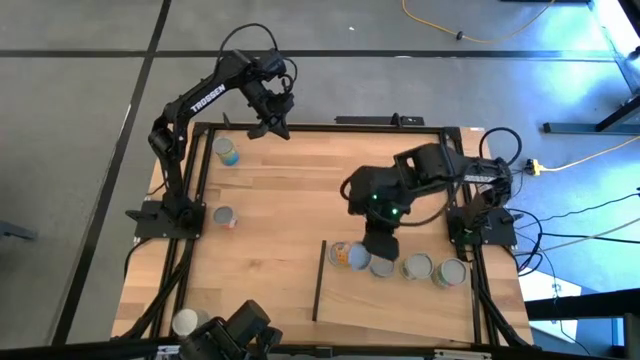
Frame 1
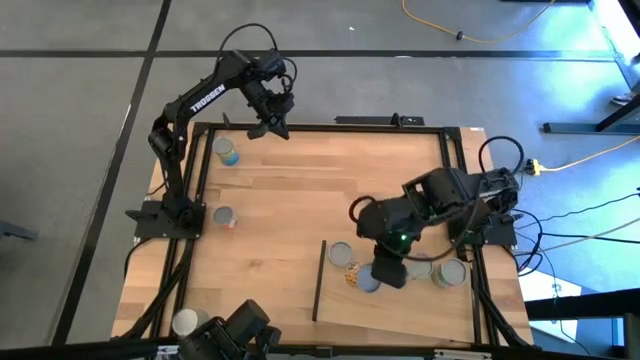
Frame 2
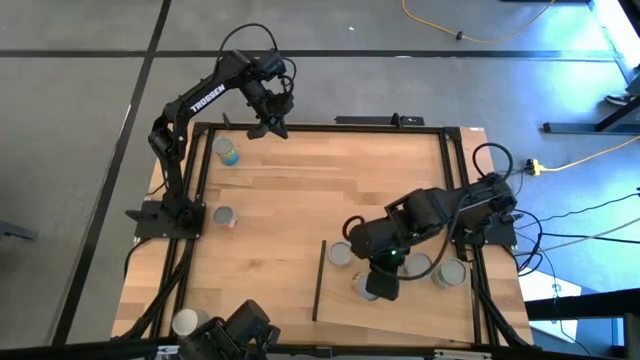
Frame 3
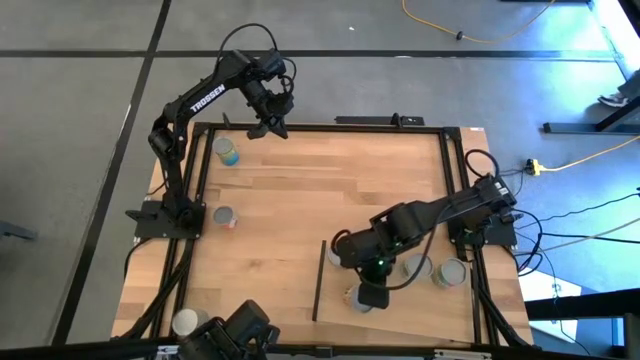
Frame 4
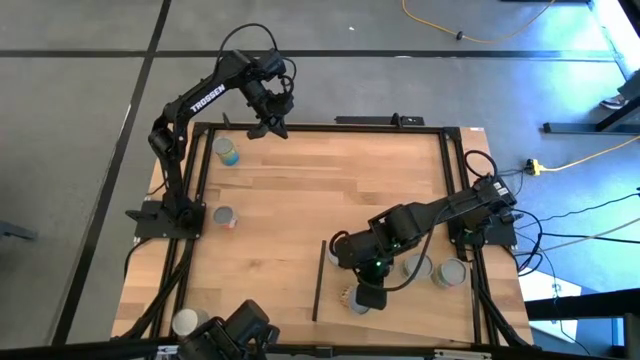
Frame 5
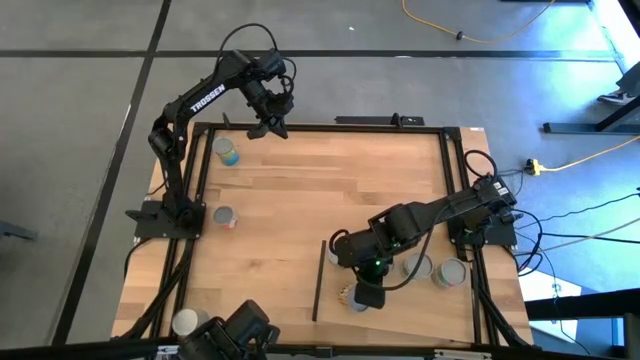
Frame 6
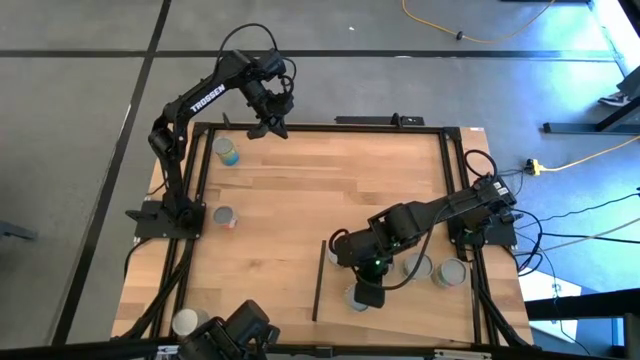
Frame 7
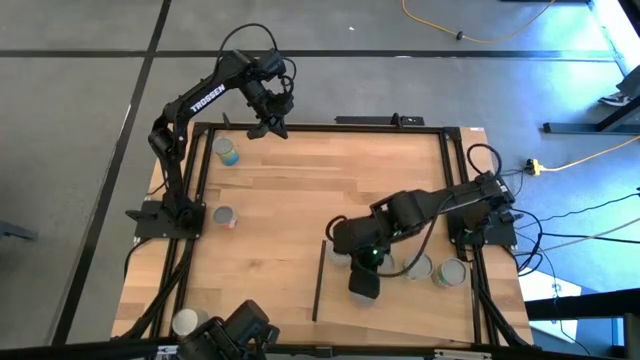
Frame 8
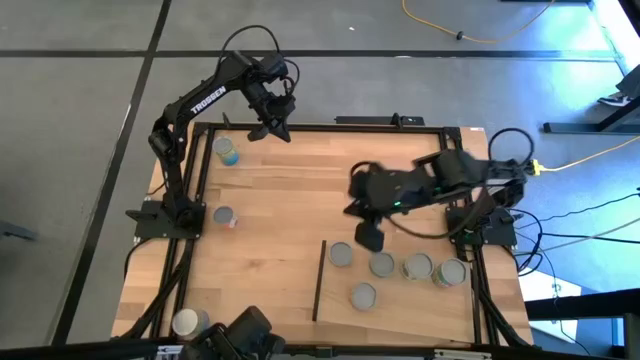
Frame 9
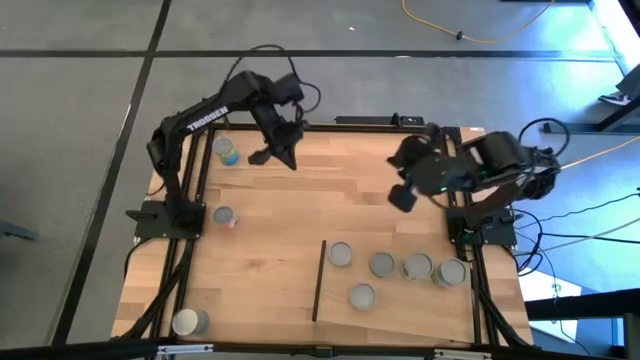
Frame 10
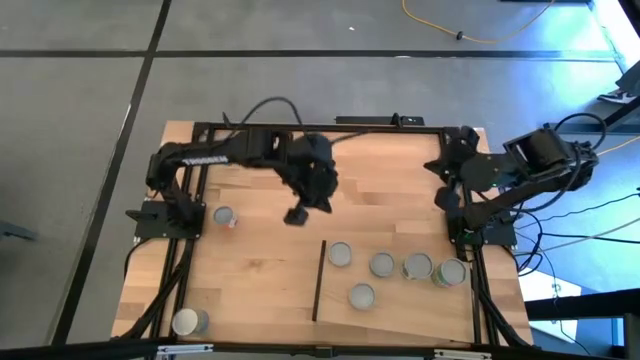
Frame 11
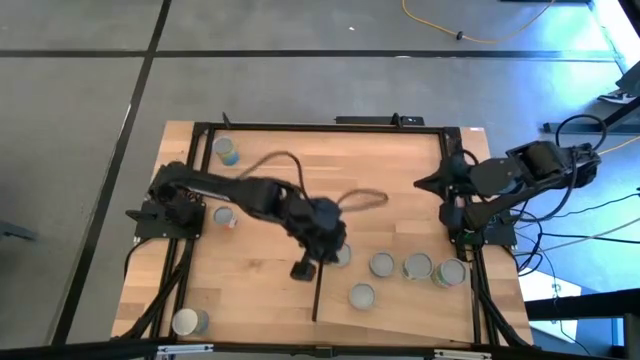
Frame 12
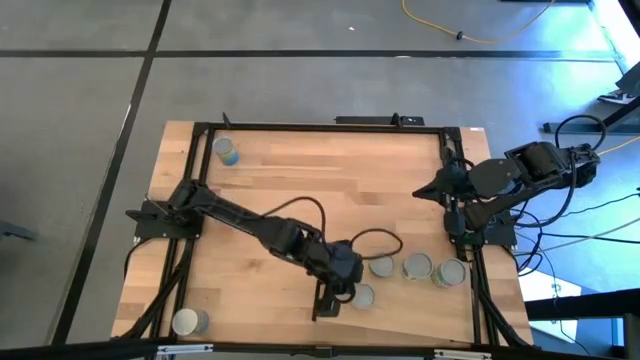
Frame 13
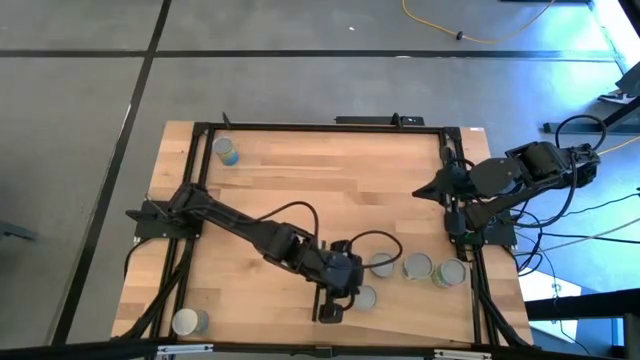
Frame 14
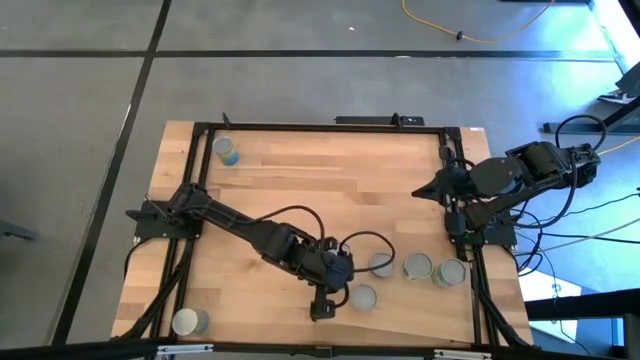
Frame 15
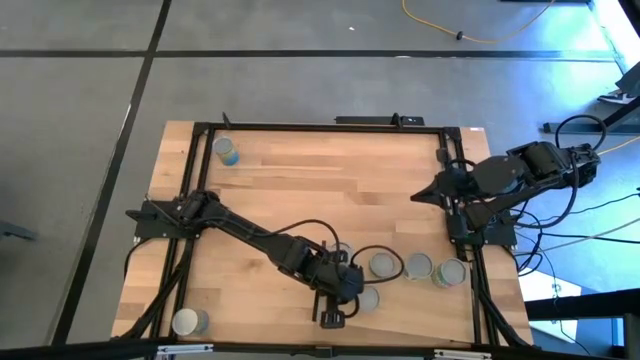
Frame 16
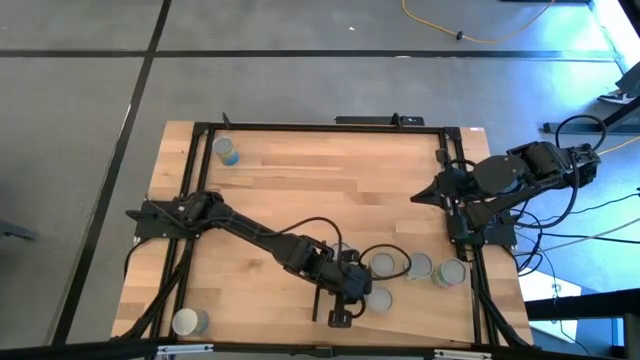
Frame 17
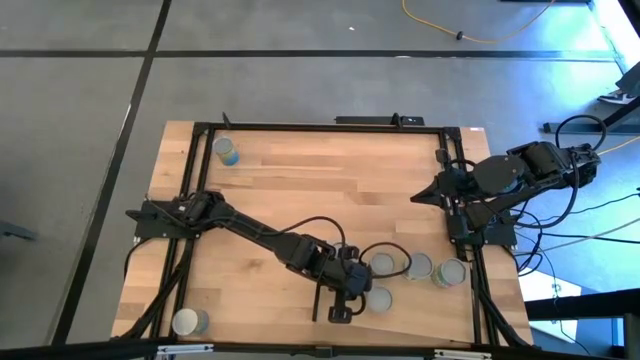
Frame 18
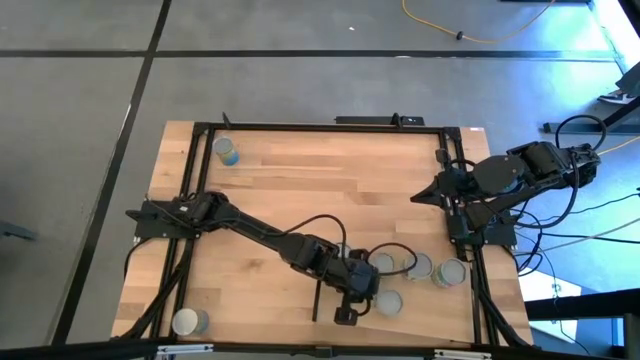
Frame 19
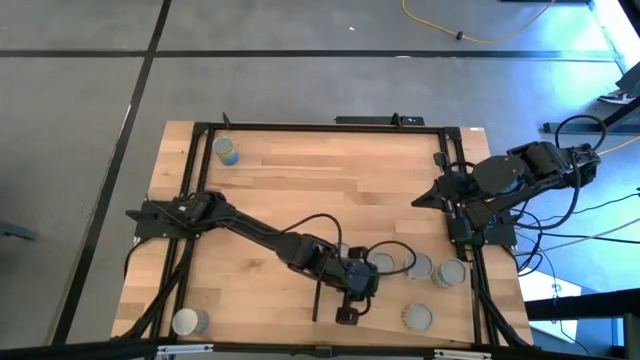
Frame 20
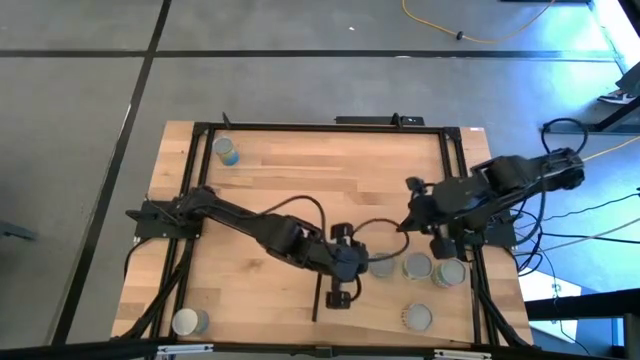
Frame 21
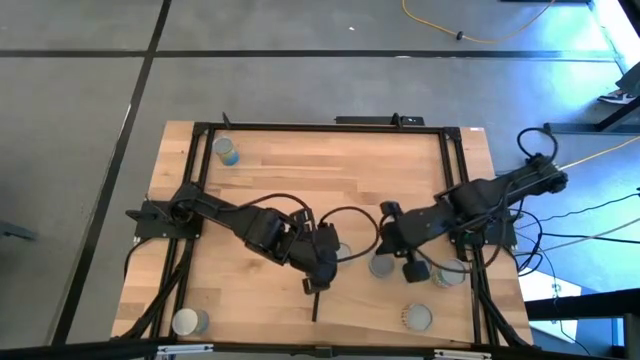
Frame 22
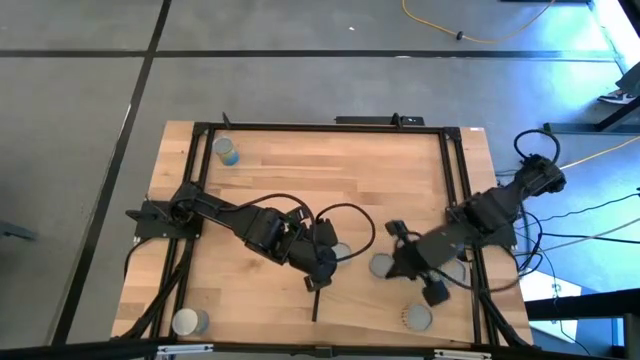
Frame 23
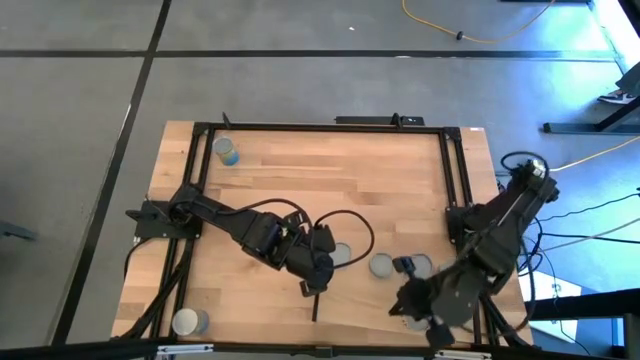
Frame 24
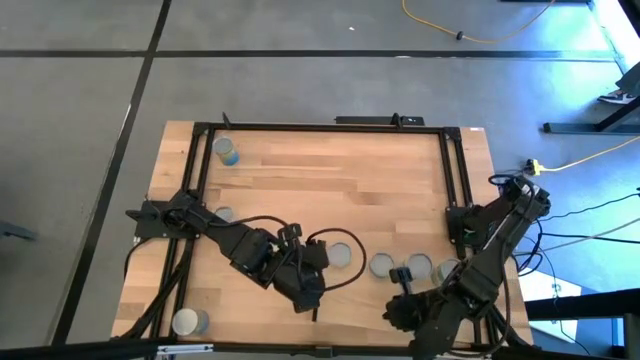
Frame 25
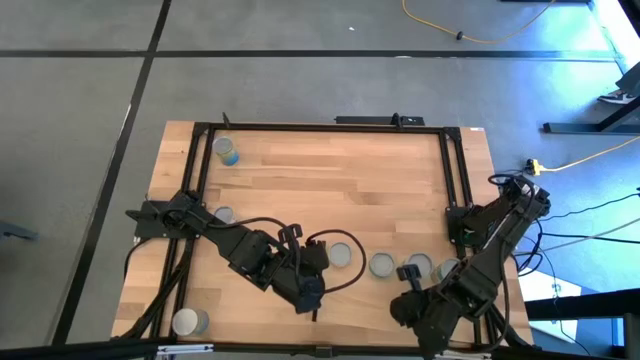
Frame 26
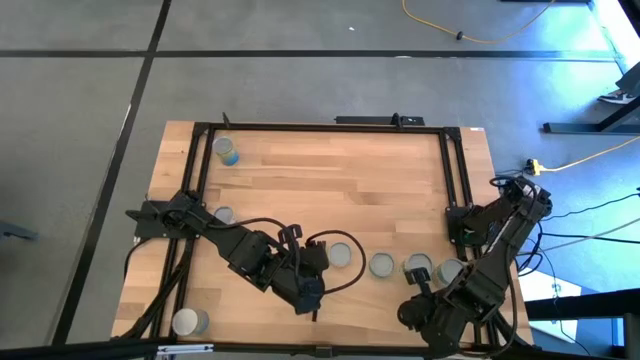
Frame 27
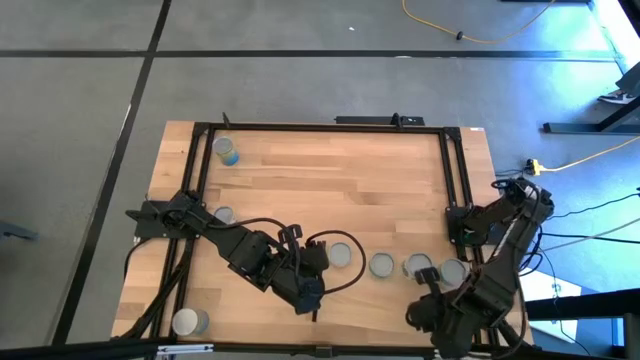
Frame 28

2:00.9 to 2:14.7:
Task: Pick and place cans onto a shelf
Put the yellow canned black beans on the shelf aligned with the other pink canned chicken soup

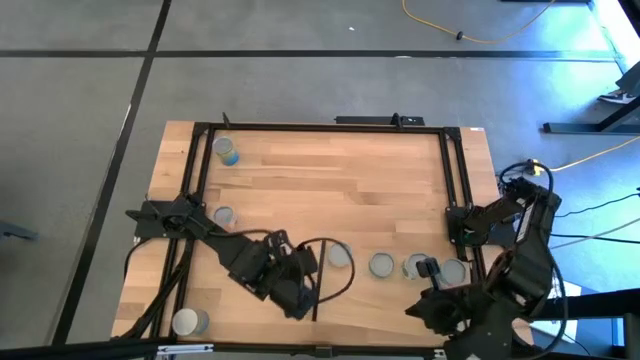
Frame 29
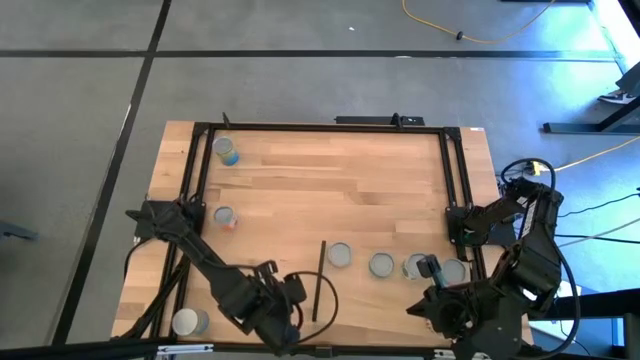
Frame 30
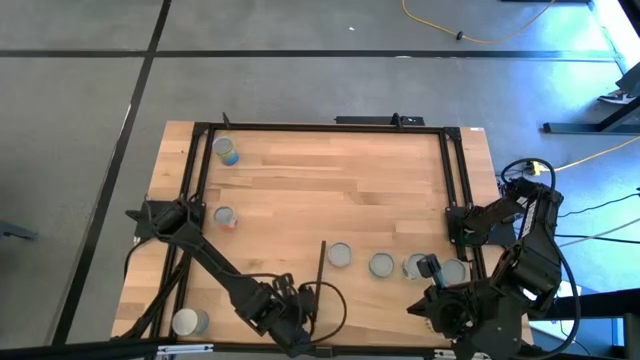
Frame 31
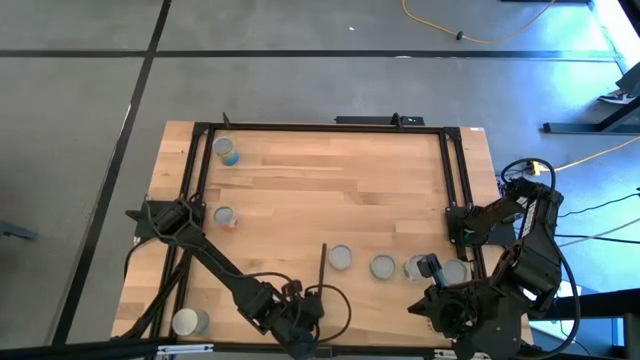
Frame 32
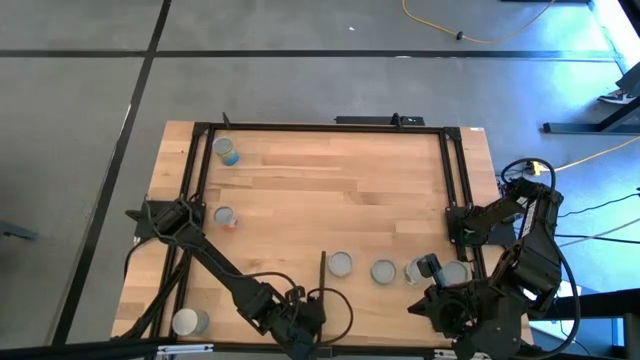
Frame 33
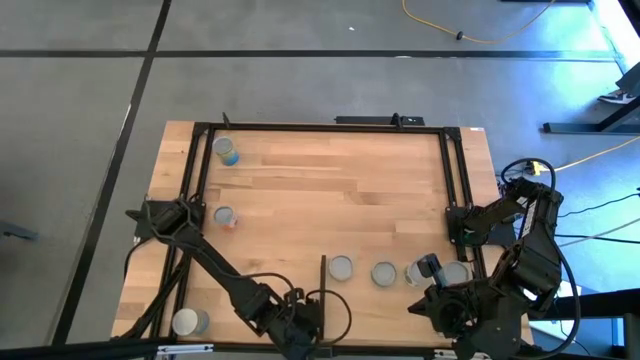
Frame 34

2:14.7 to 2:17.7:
Adjust the shelf

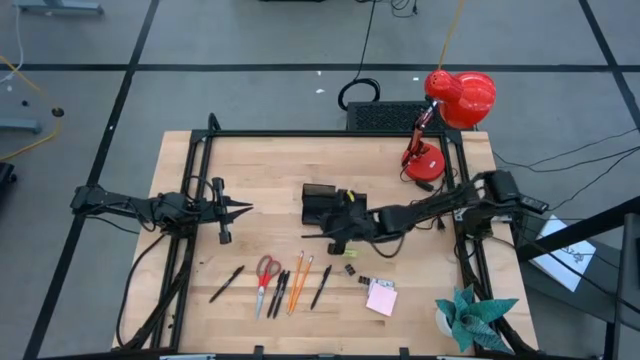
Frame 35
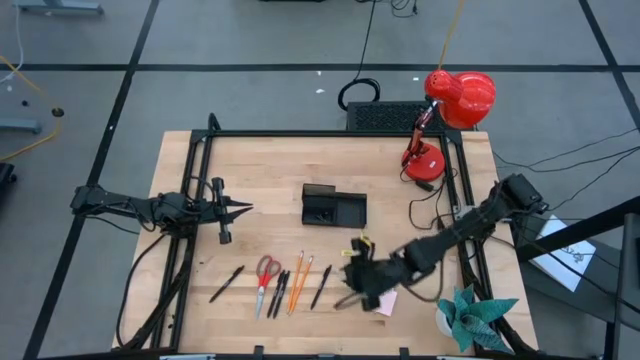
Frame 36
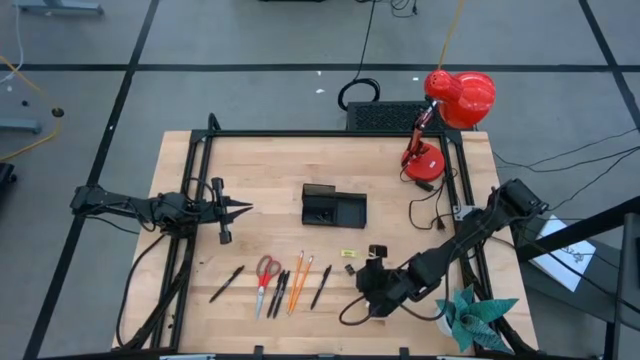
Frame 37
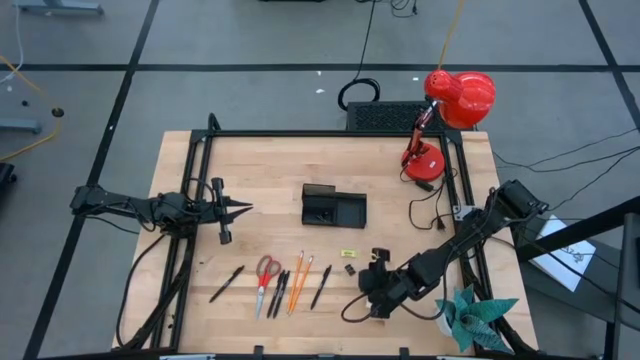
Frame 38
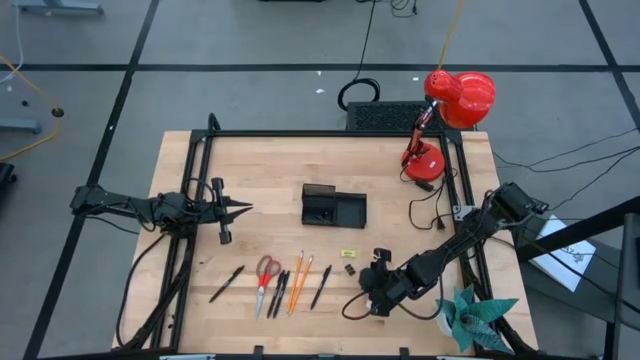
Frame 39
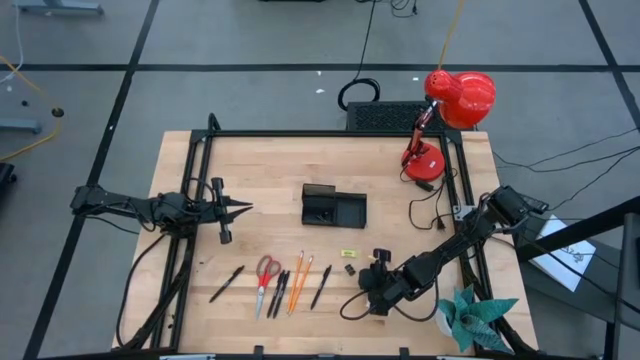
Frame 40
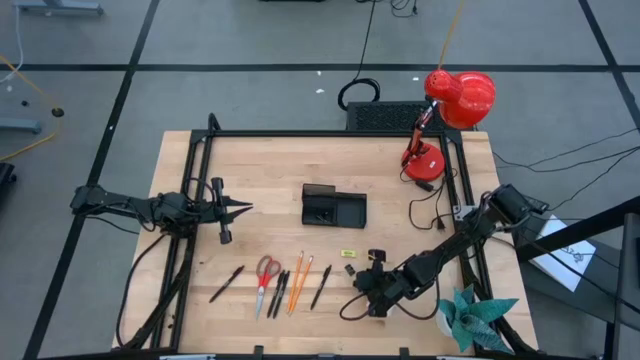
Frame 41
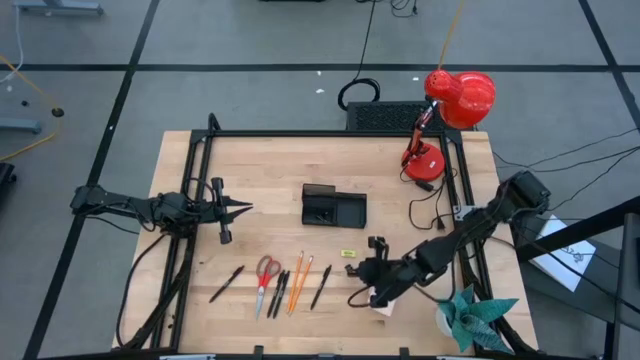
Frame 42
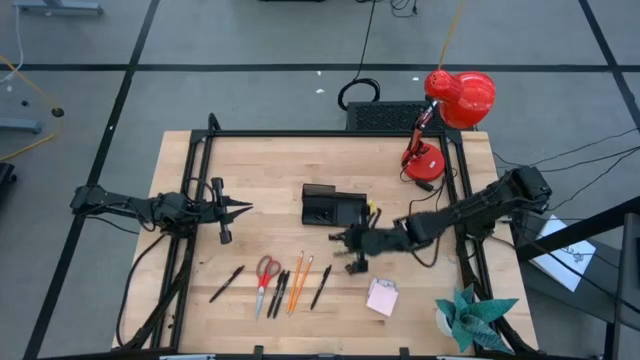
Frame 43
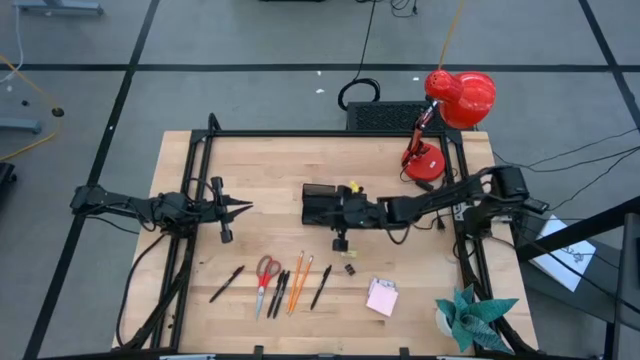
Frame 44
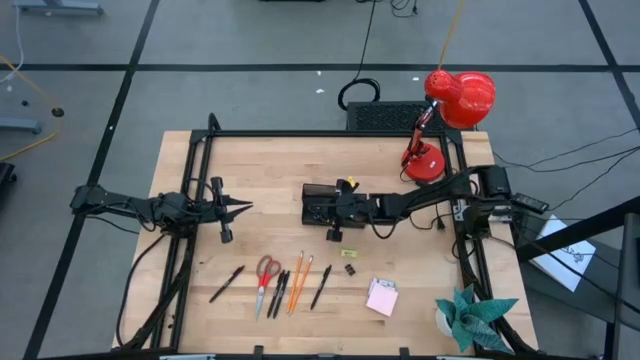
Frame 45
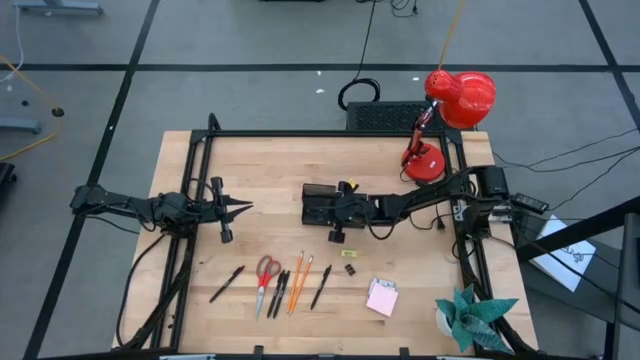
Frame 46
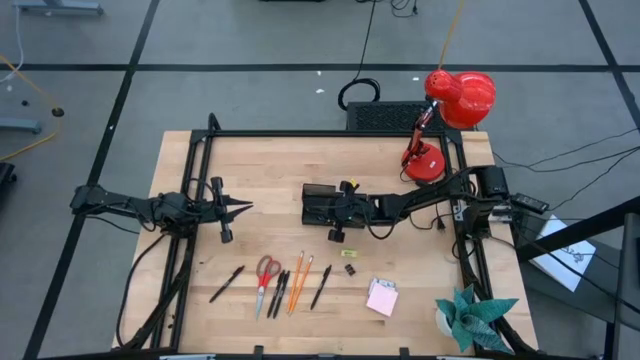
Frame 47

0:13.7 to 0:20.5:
Task: Pick and place office supplies into organizer
Put the binder clip into the desk organizer
